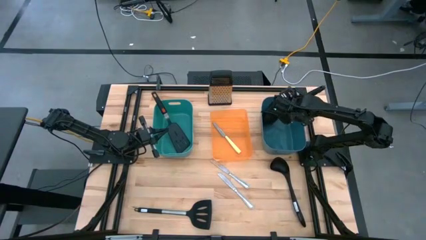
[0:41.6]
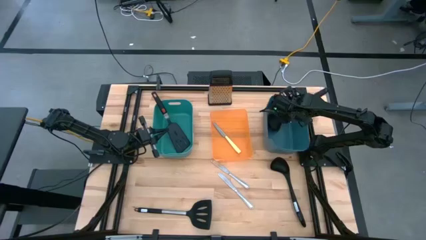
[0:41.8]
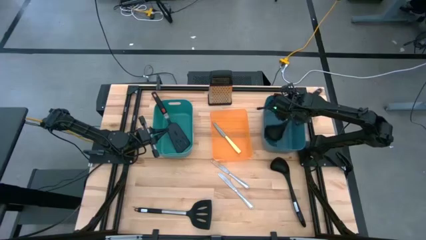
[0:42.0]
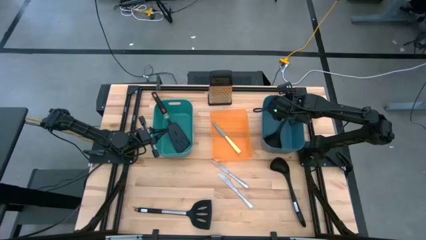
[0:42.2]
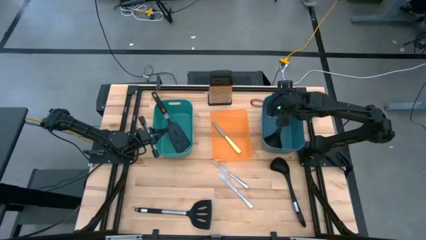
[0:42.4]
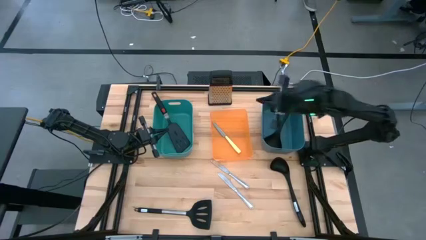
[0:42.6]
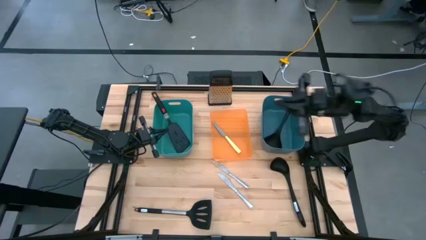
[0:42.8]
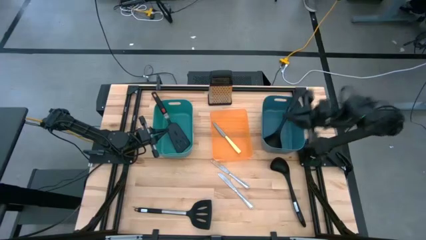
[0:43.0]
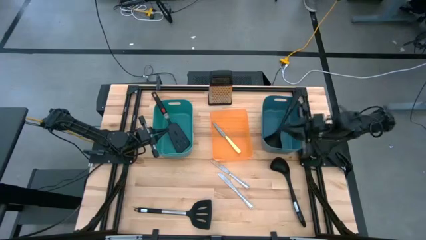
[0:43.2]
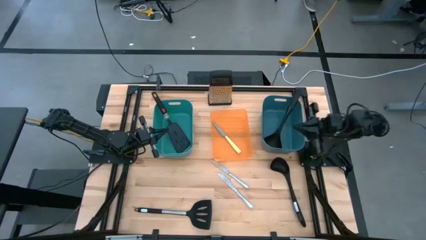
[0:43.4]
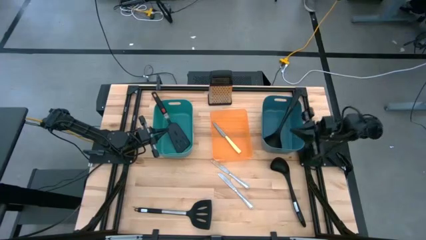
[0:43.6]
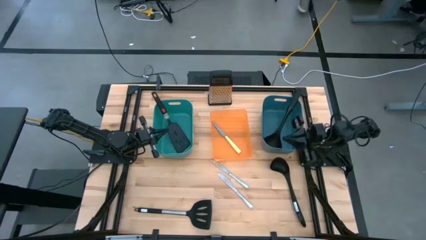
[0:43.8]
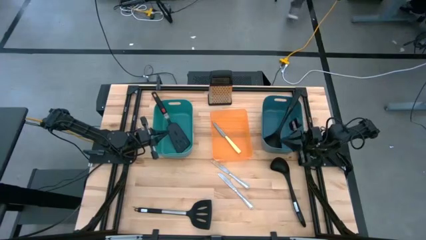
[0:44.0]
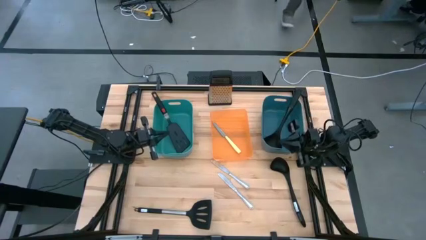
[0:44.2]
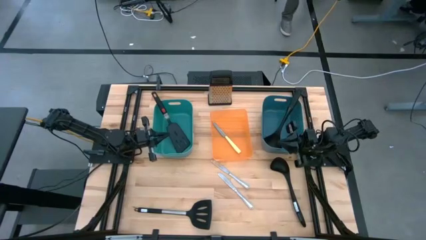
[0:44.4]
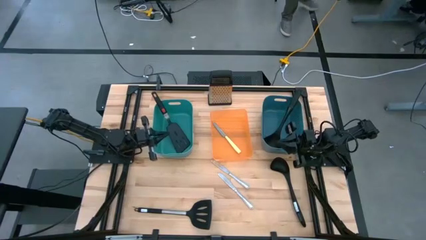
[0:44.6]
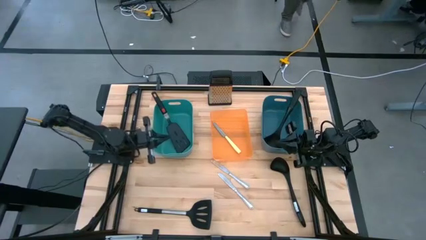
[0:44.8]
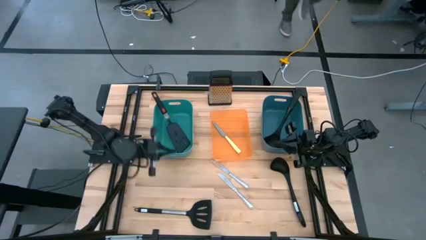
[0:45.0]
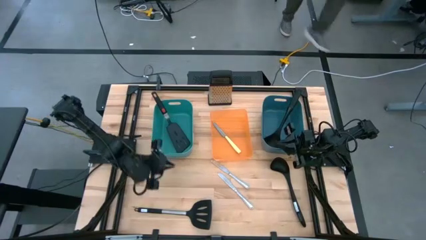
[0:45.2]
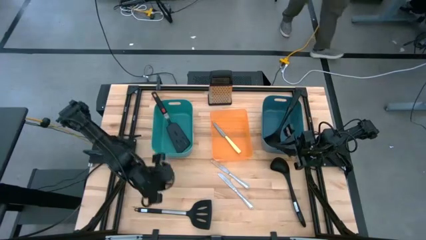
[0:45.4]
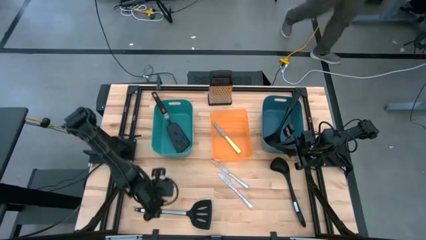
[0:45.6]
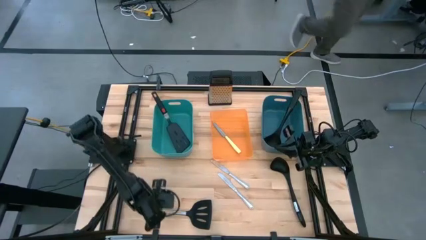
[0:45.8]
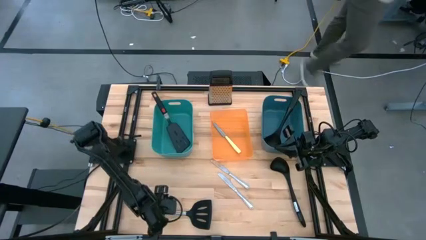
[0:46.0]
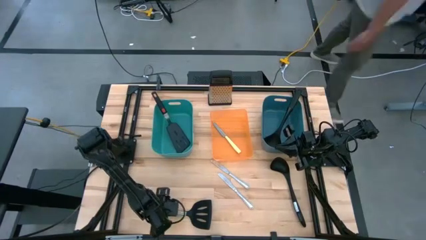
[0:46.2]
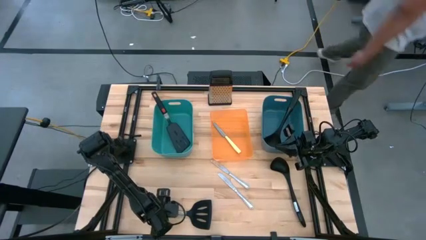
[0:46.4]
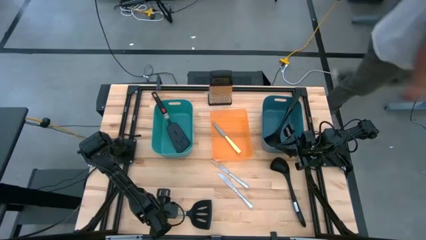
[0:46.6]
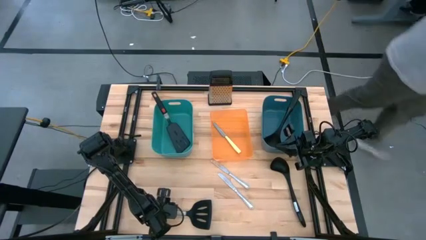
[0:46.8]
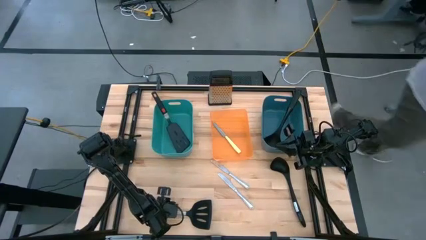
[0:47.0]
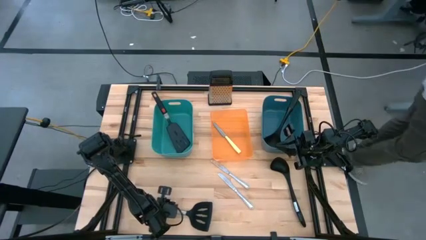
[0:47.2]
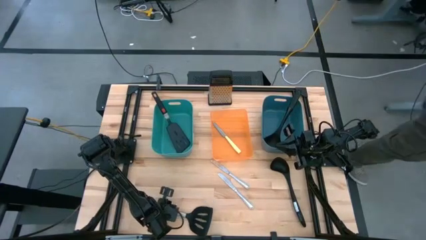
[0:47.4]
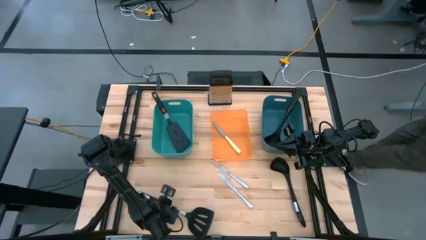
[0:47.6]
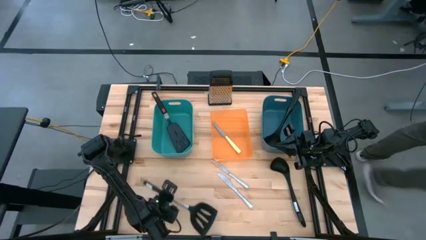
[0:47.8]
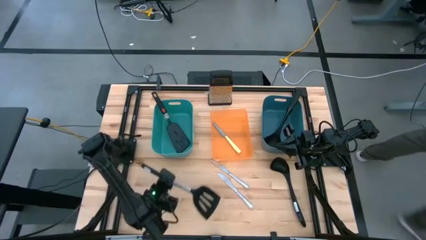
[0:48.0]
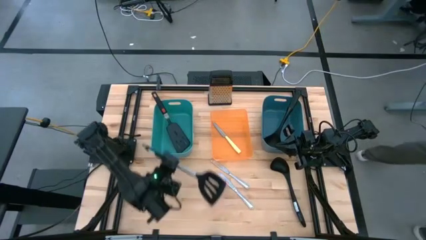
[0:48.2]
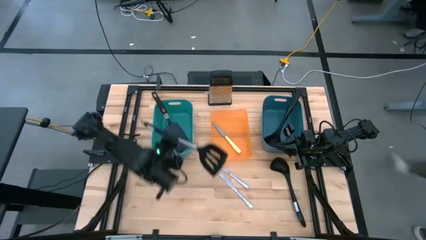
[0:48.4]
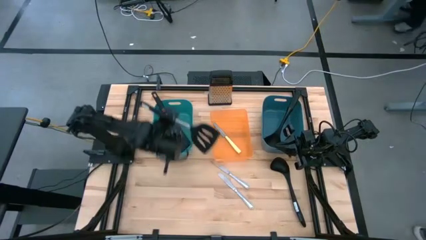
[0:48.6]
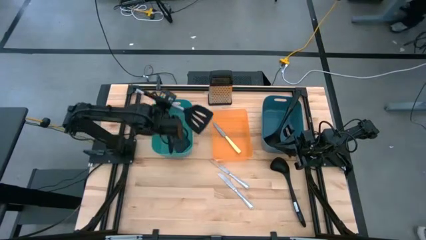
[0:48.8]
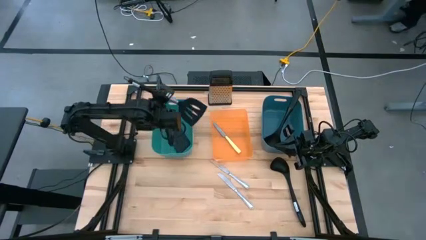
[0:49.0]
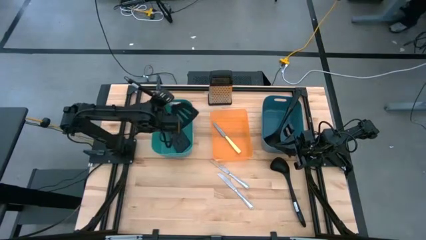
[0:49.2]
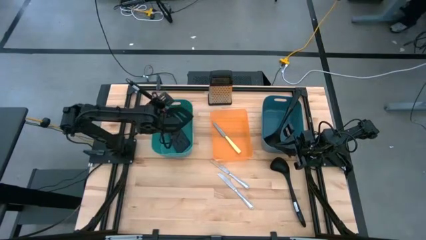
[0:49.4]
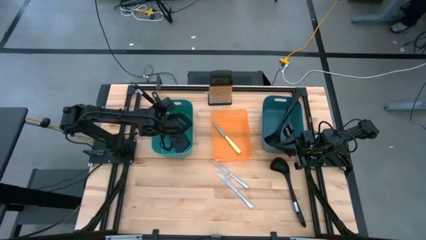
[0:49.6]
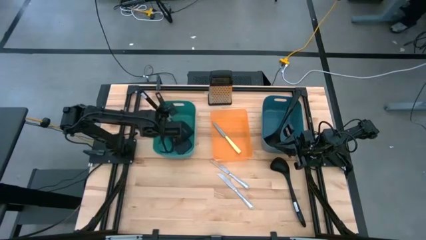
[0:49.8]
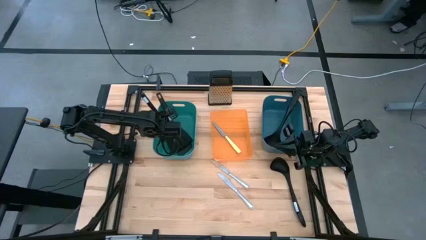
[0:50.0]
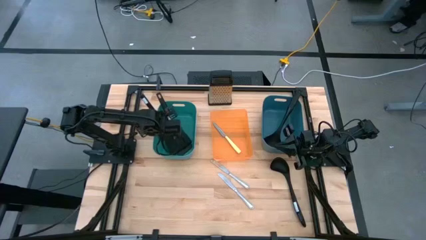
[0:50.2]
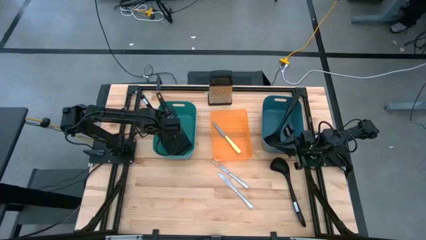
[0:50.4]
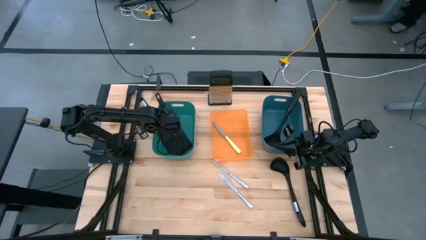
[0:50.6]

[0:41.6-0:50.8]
Task: Pick & Place Kitchen Items
Put the black spatula into the green bin

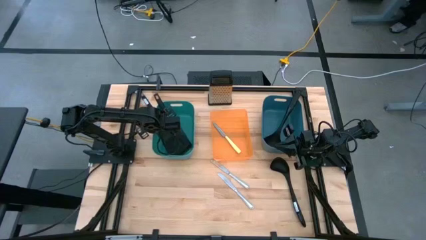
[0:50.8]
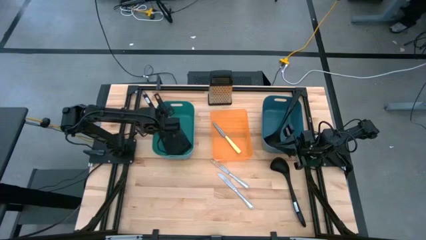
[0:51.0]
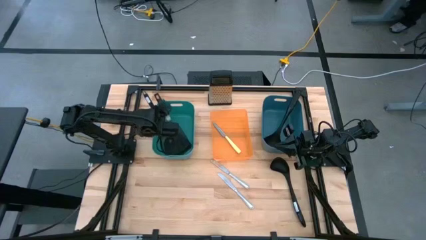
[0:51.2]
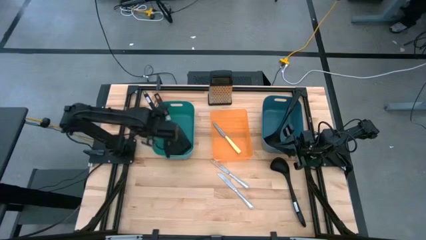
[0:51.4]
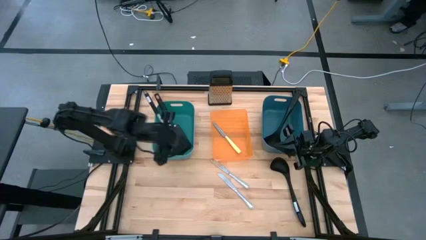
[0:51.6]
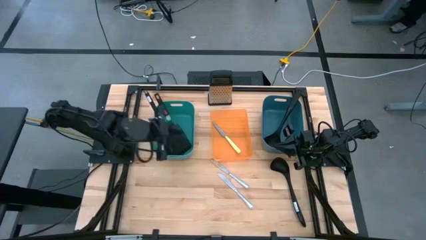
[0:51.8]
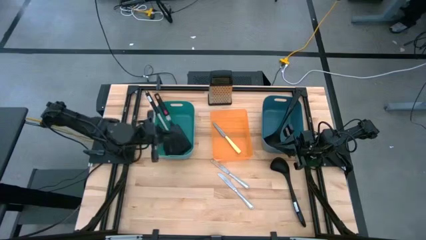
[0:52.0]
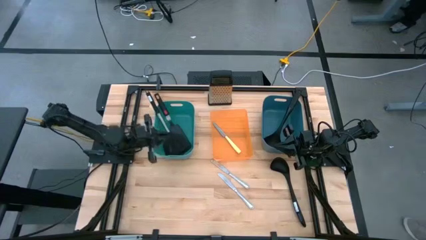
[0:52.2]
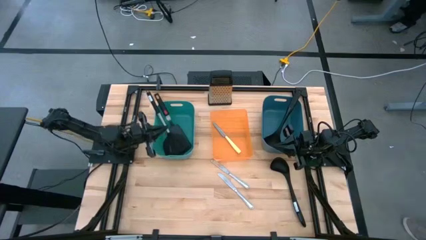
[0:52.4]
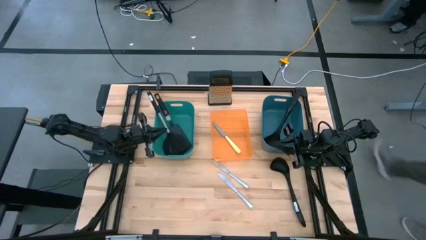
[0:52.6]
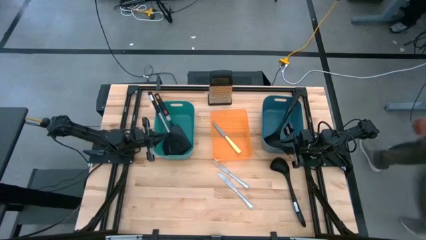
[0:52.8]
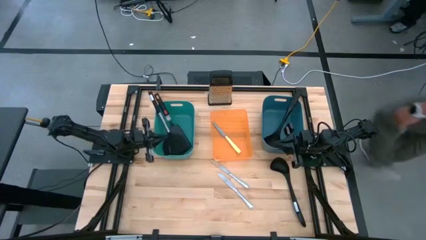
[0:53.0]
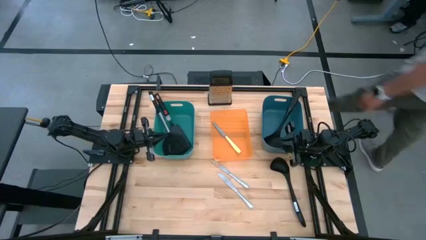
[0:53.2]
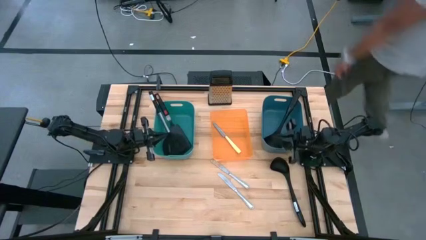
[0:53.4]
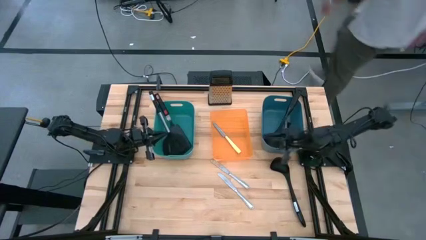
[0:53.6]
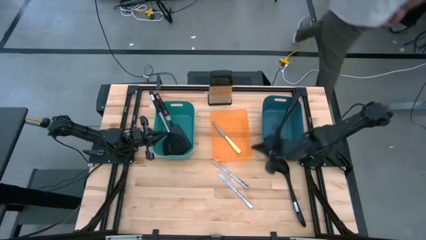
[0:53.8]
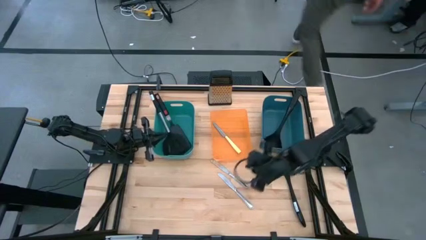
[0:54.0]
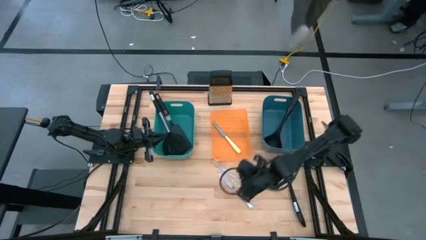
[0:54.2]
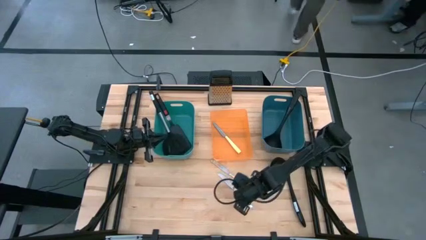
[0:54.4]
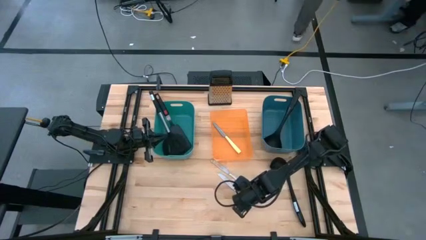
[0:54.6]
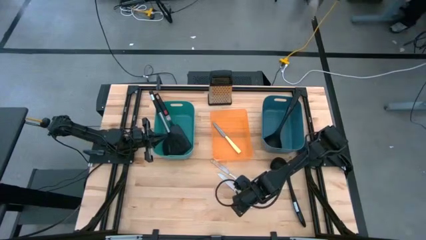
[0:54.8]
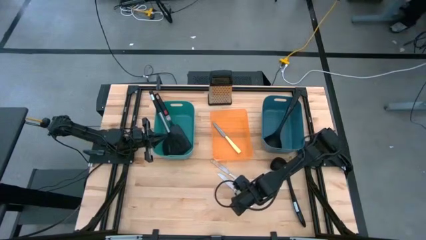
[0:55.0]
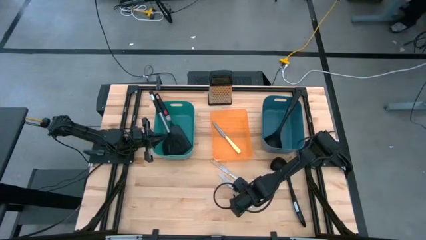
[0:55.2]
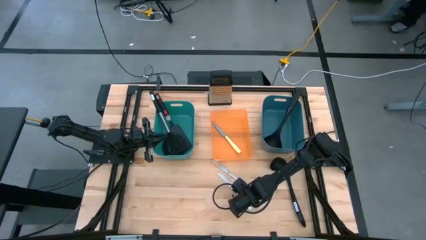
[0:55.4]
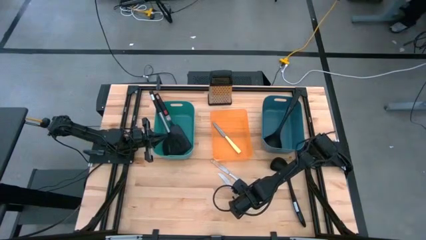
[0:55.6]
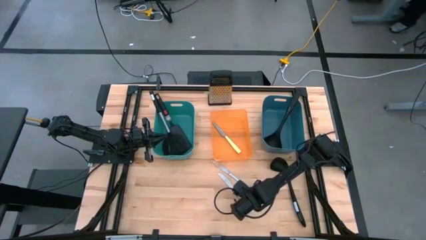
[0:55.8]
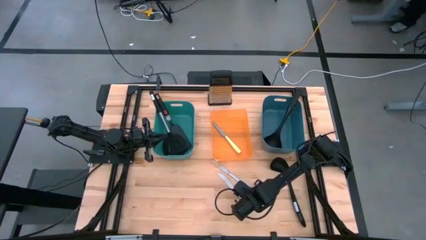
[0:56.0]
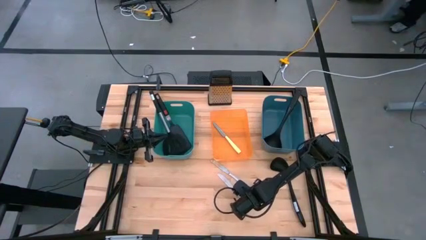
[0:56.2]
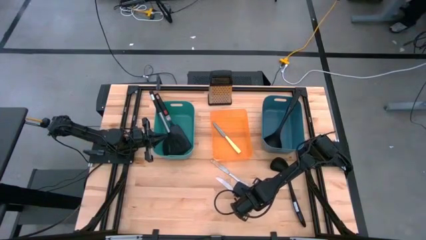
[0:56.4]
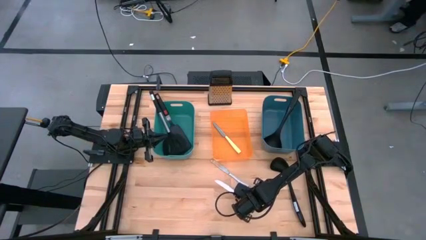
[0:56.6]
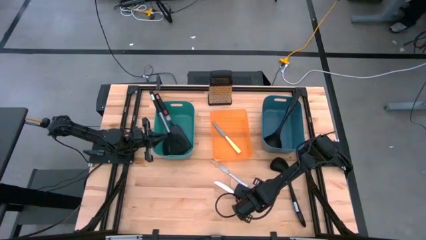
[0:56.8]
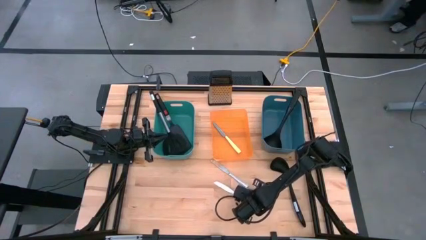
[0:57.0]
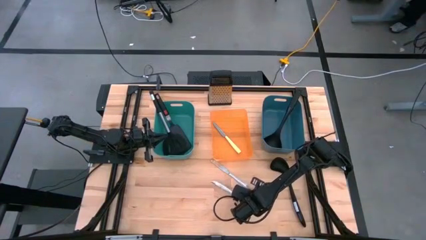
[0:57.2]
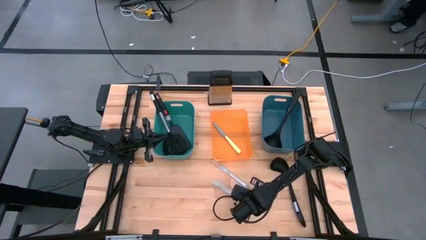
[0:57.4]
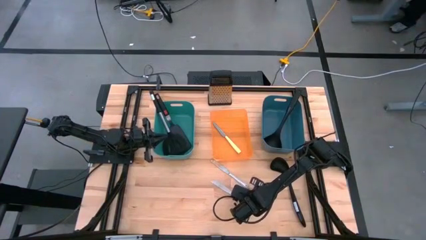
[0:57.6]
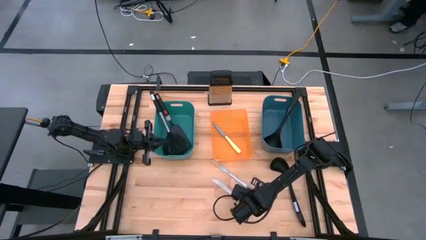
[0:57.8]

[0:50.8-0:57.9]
Put the bottom silver knife into the orange bin

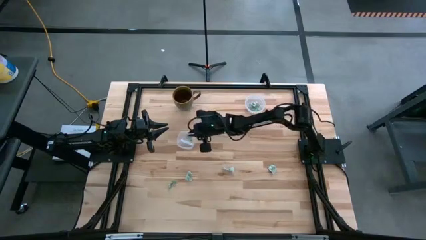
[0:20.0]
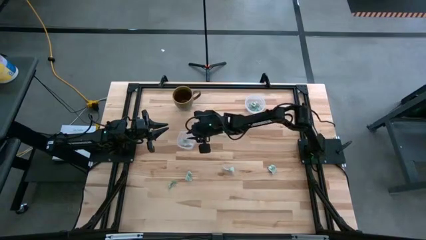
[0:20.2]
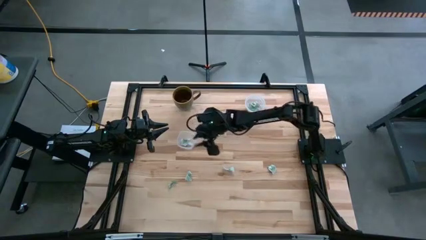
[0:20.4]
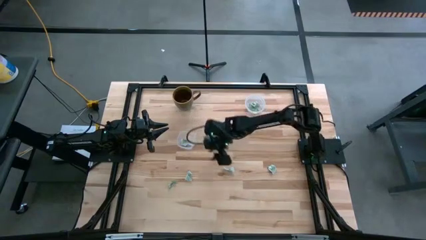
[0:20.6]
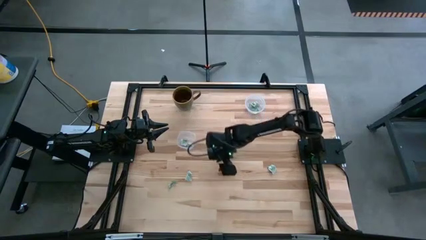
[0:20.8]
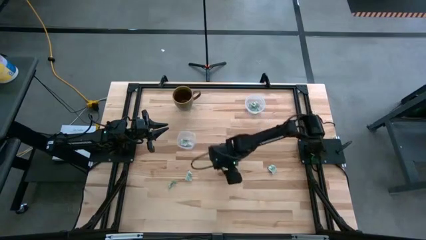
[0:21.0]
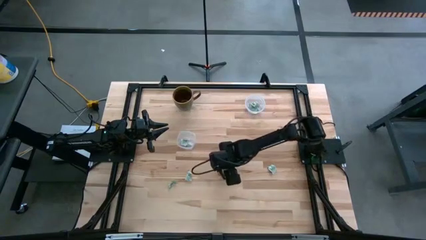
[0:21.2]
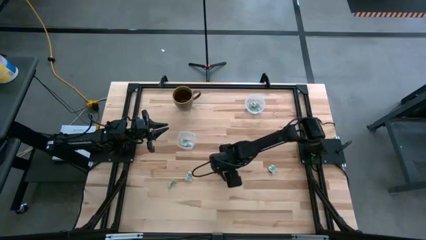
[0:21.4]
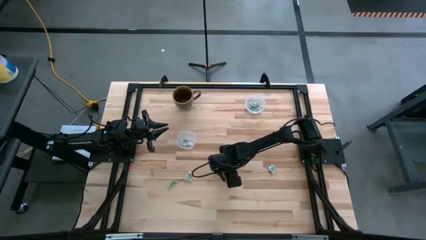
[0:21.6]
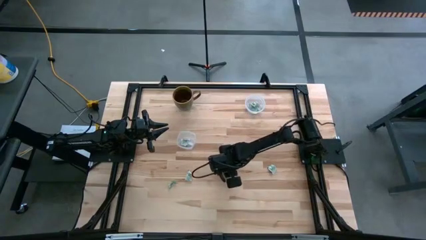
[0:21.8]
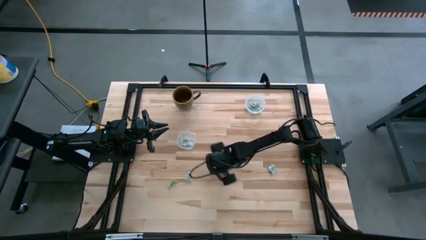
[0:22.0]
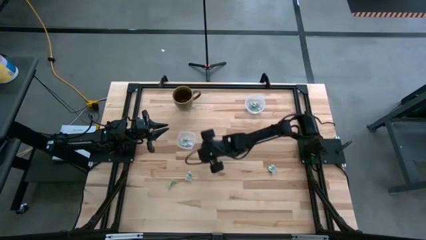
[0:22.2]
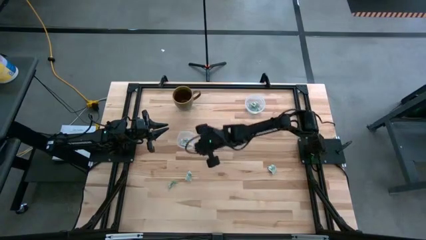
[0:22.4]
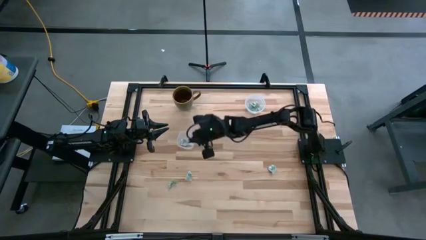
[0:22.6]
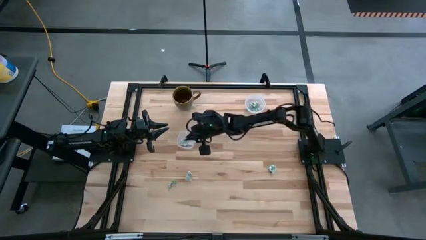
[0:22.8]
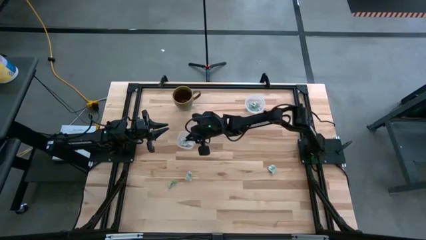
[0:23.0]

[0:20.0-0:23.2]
Task: Pick and place Stevia / Truvia into bins
Put the stevia packet into the bottom container
